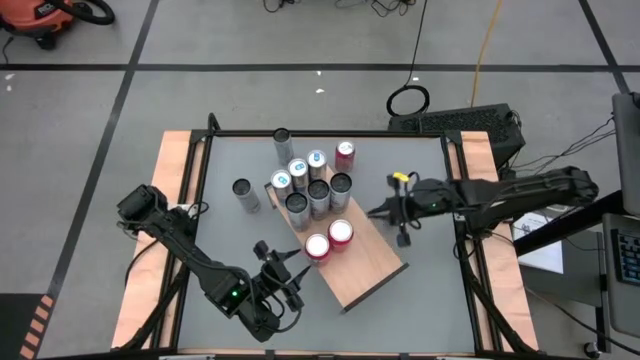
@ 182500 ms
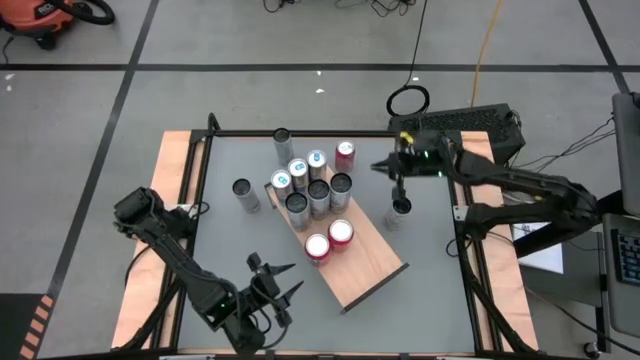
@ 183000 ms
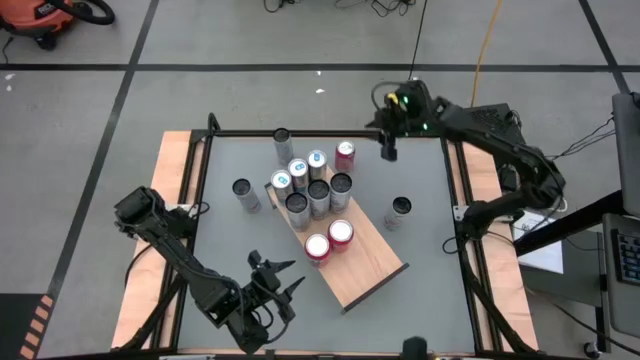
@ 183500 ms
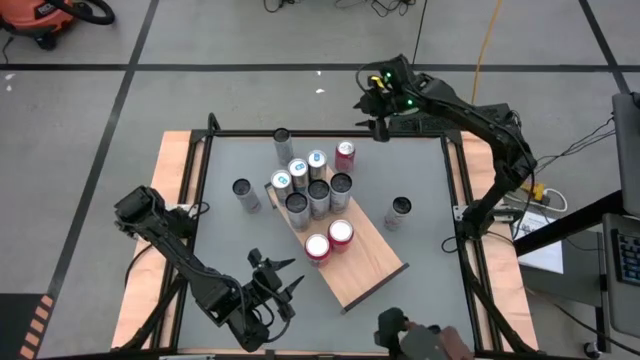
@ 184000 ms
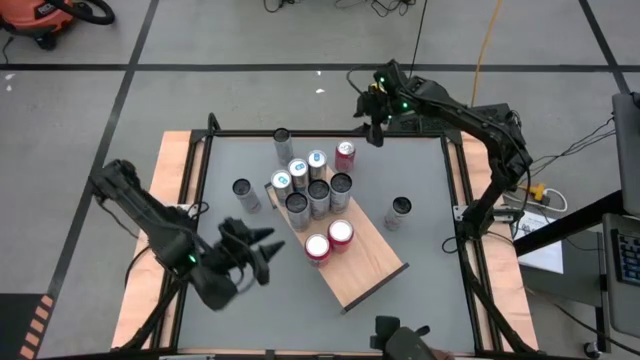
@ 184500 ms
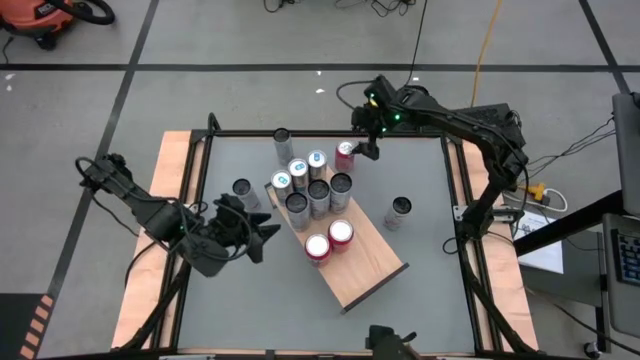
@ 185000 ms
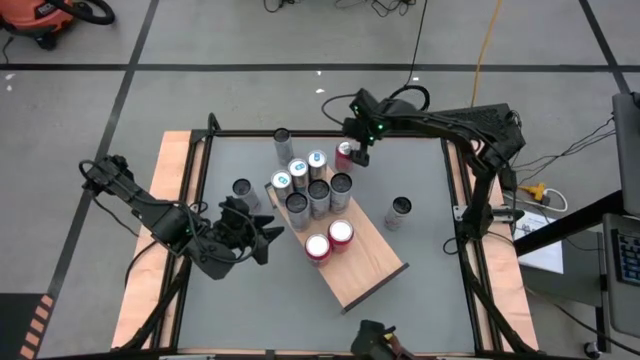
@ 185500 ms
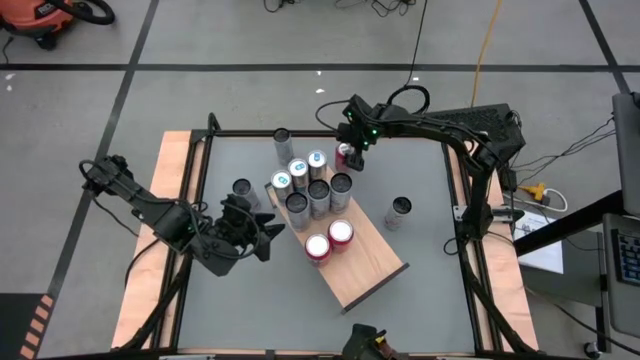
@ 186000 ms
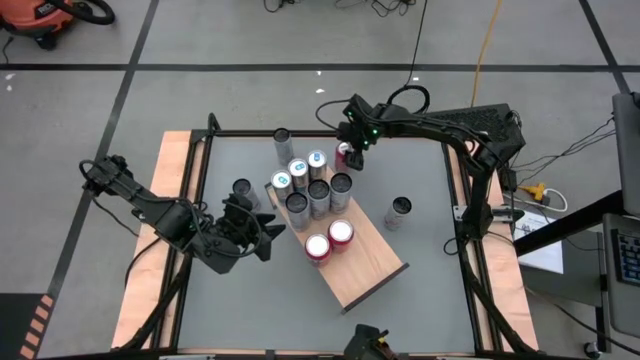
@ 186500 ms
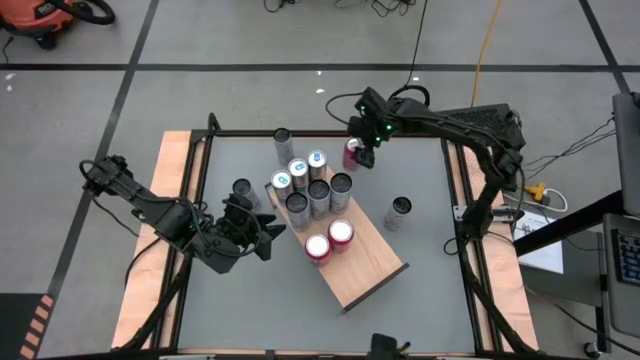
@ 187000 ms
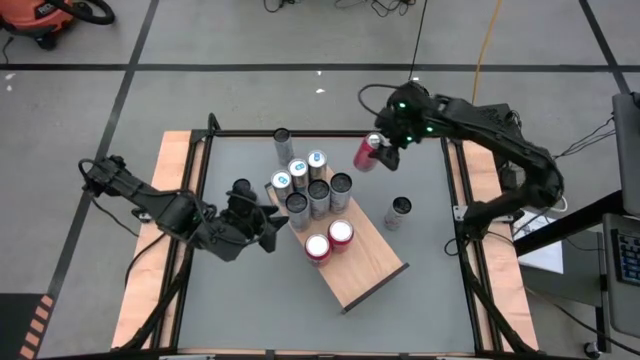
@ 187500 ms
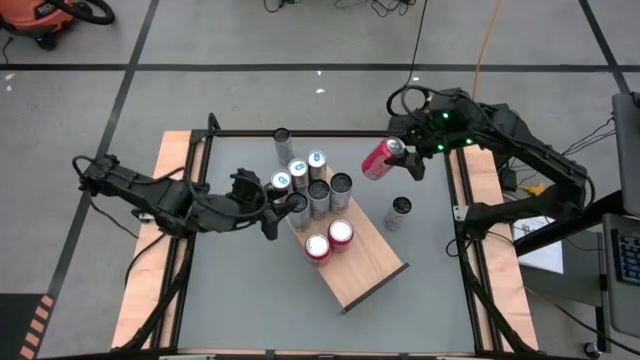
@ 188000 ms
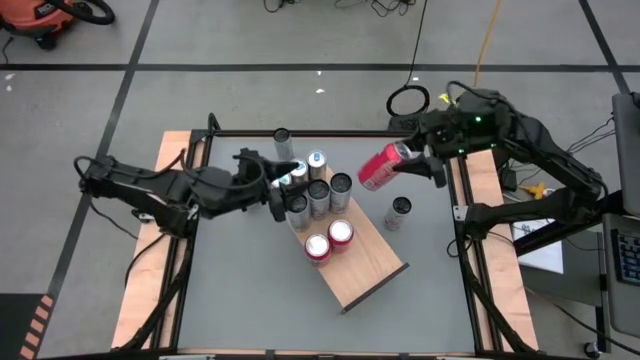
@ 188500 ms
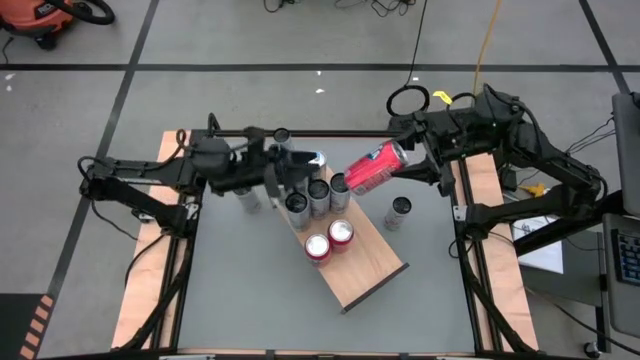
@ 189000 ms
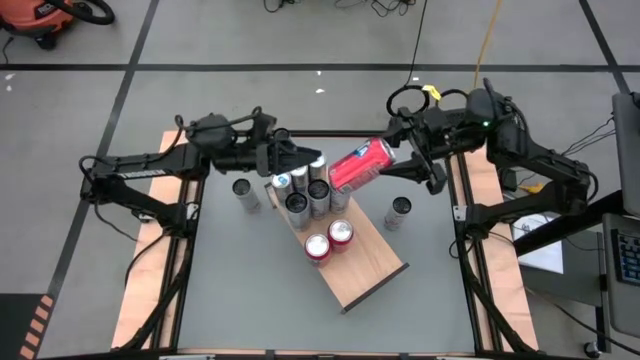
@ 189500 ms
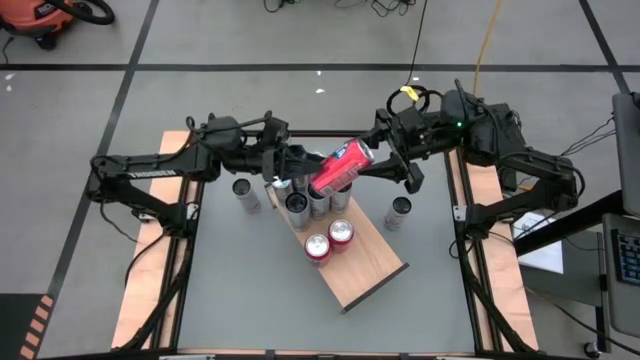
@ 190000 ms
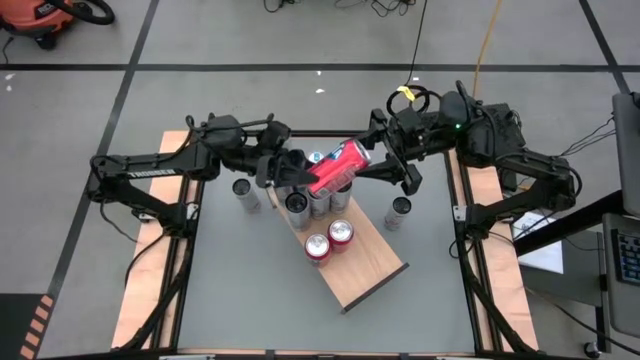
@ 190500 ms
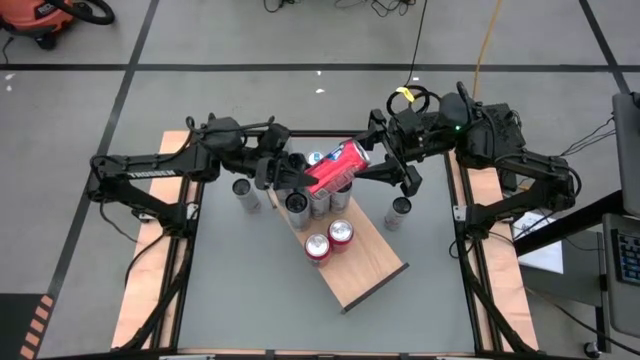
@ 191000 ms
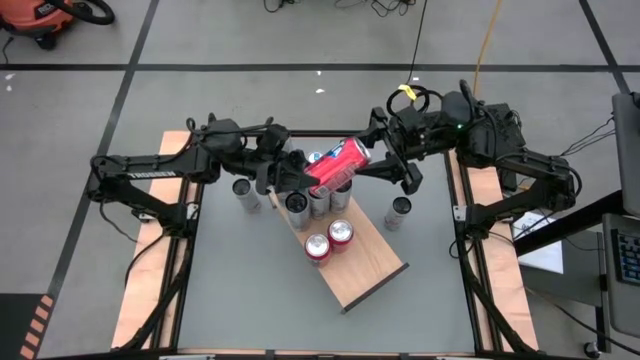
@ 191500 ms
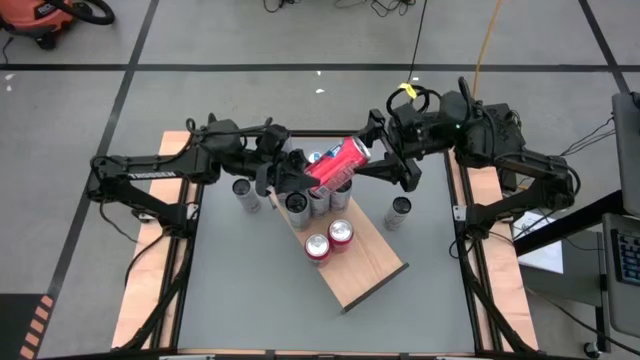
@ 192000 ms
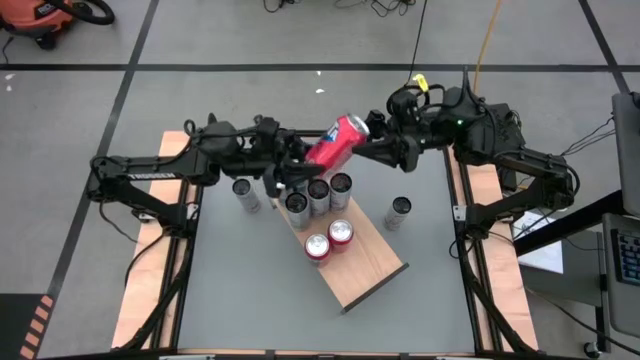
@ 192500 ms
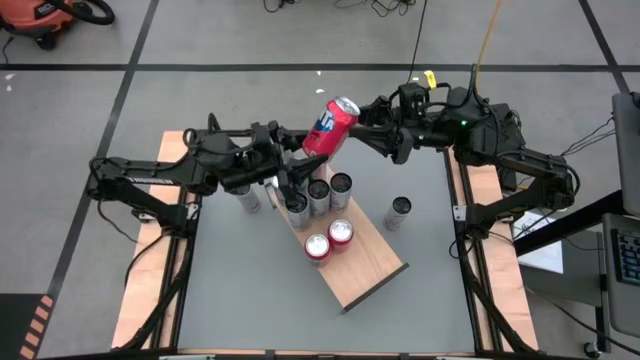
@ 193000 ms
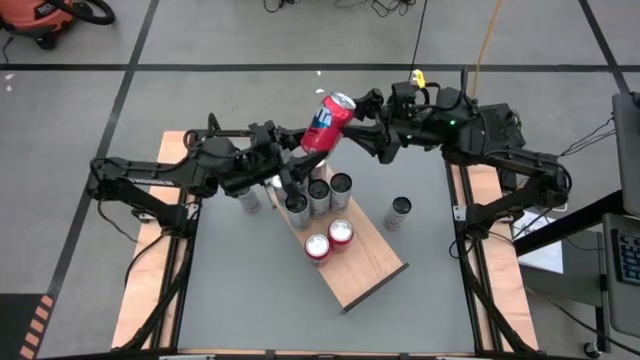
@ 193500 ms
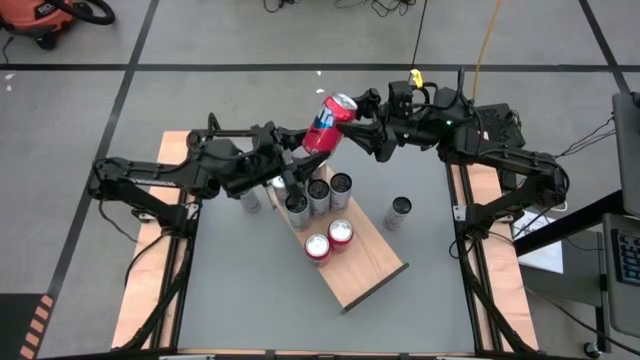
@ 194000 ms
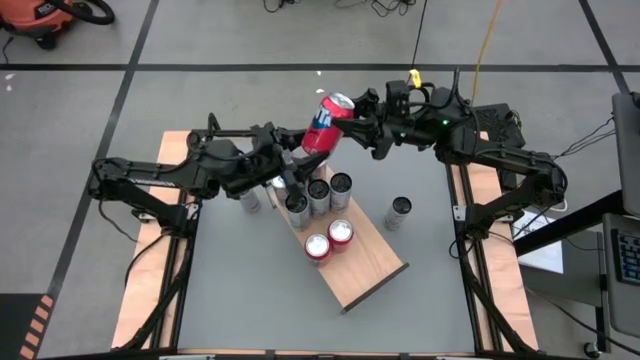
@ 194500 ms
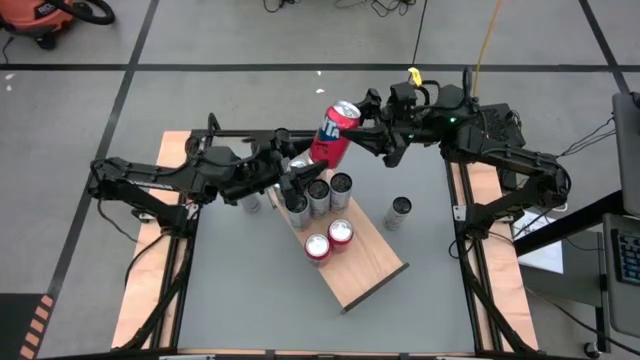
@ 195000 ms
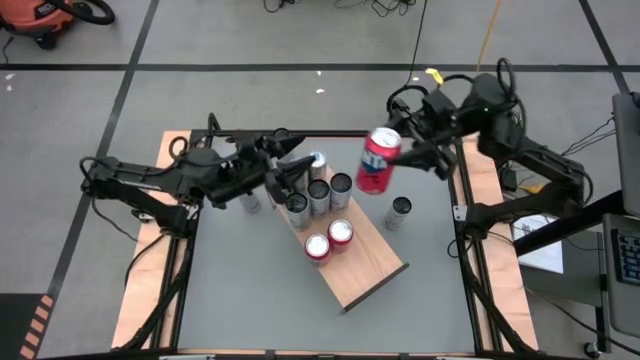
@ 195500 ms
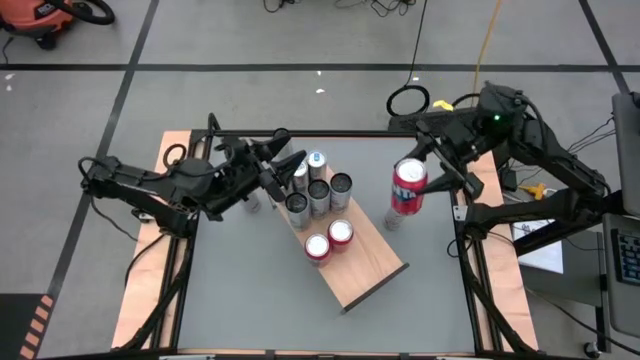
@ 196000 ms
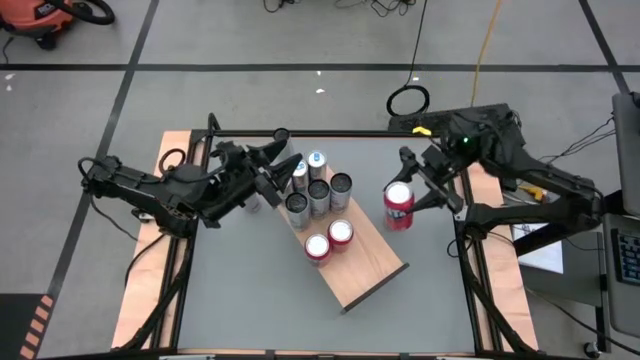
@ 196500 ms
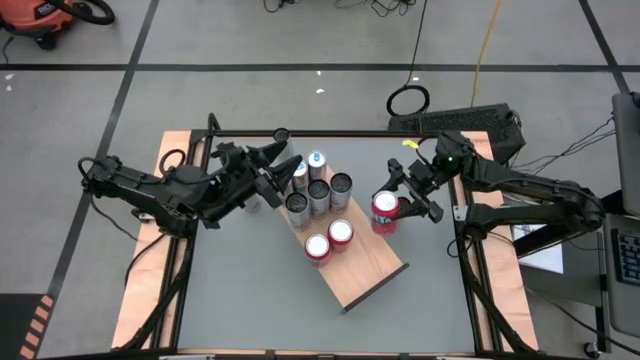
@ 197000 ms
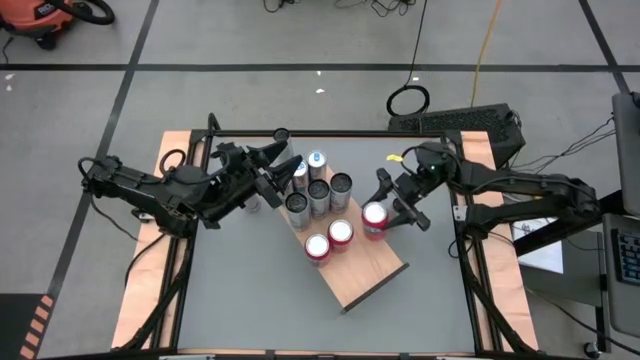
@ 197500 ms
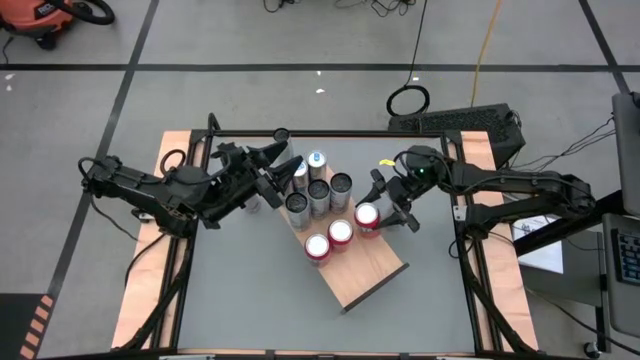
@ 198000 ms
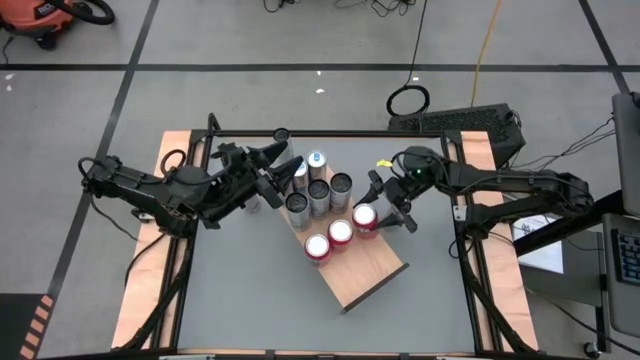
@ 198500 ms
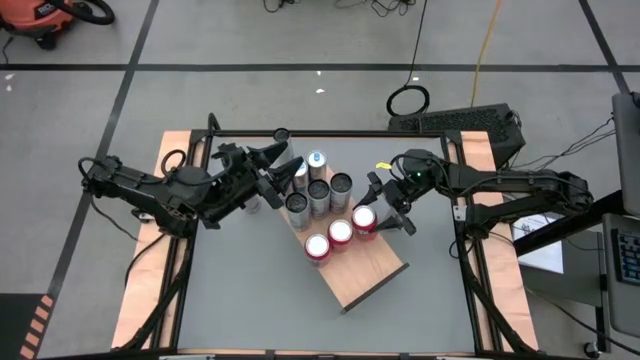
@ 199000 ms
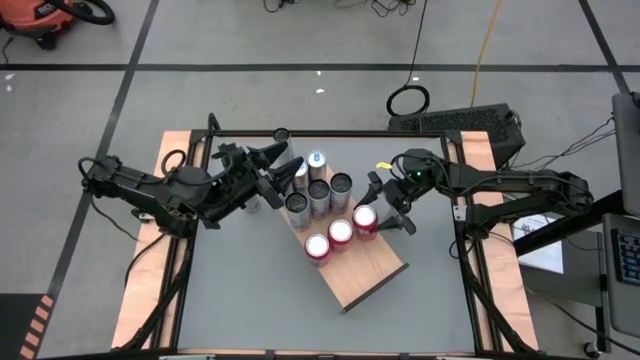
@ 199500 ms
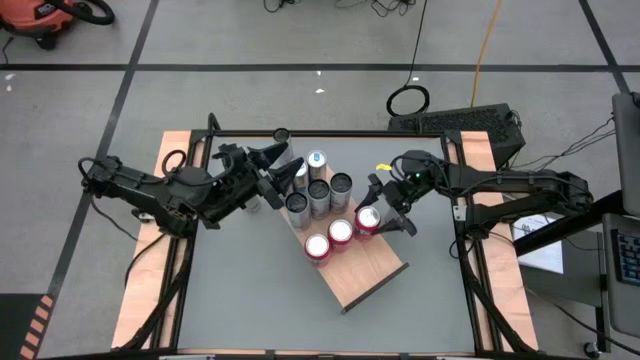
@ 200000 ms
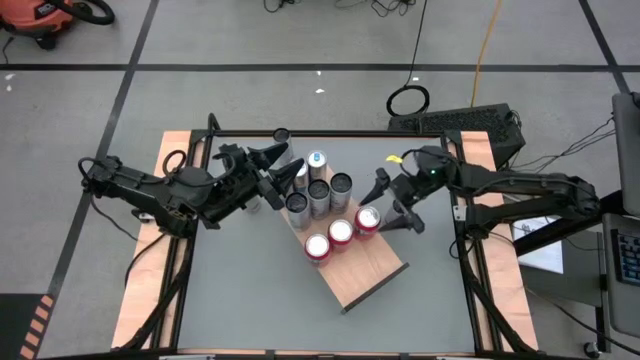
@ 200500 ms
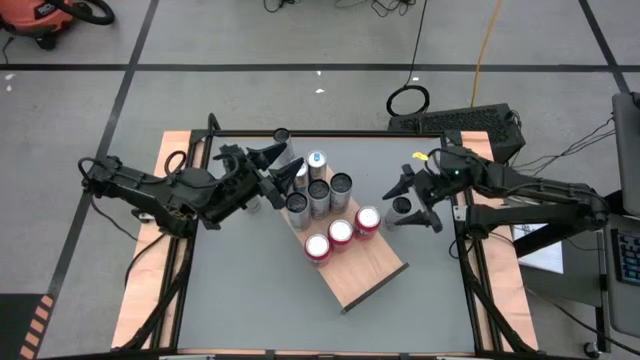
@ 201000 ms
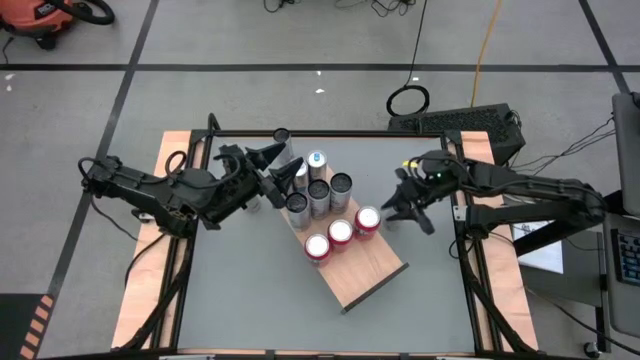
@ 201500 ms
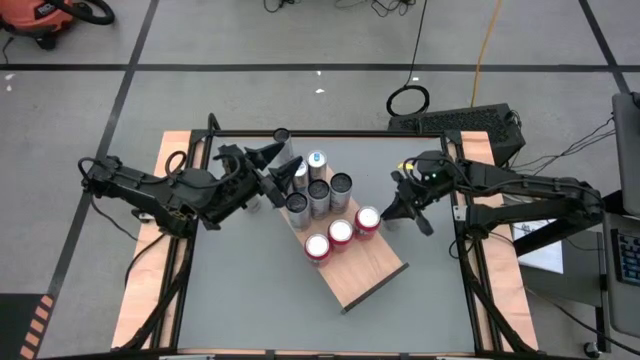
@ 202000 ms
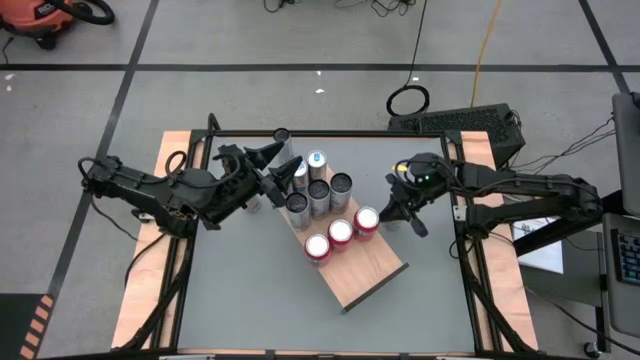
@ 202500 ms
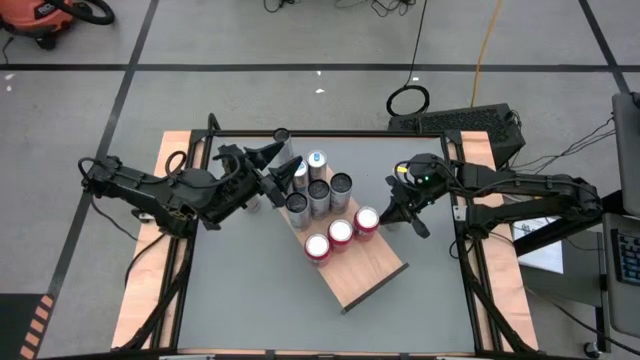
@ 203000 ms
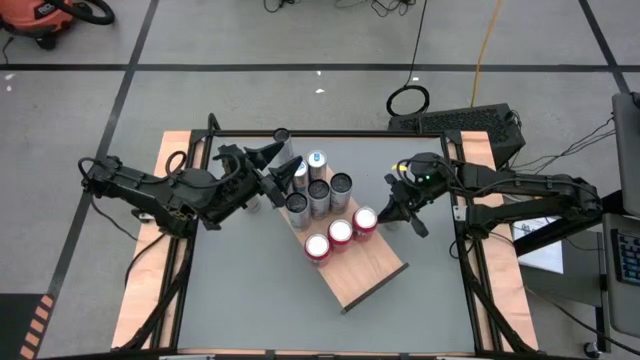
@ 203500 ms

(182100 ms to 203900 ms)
Task: Place canned beverage on shelf
Put the orange soda can on the shelf aligned with the other orange soda cans
